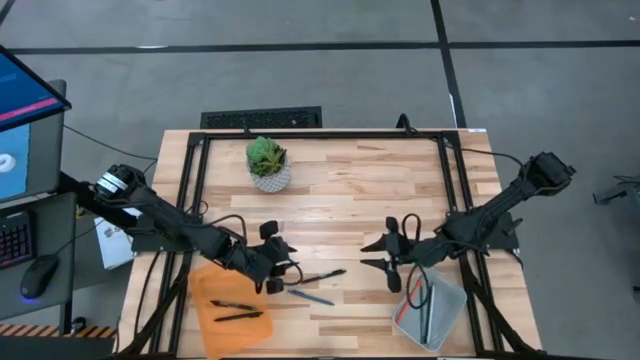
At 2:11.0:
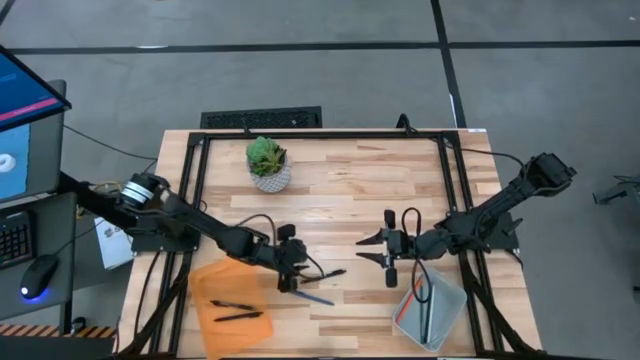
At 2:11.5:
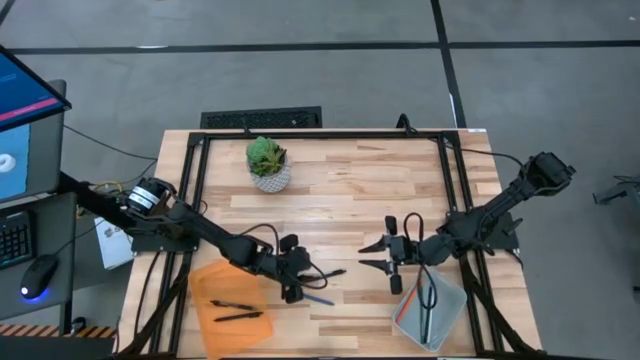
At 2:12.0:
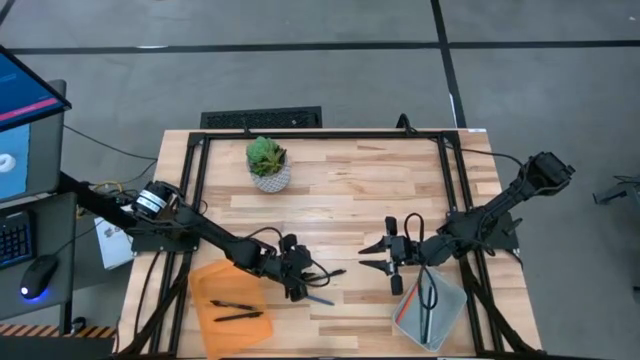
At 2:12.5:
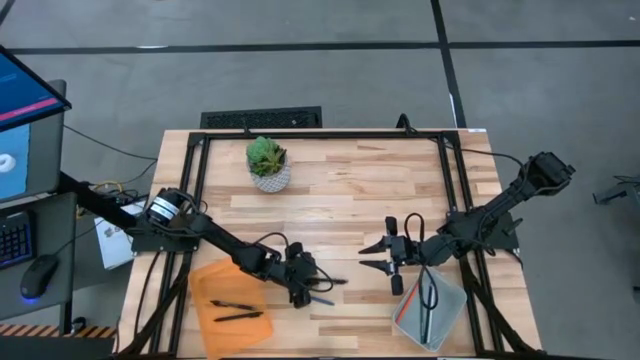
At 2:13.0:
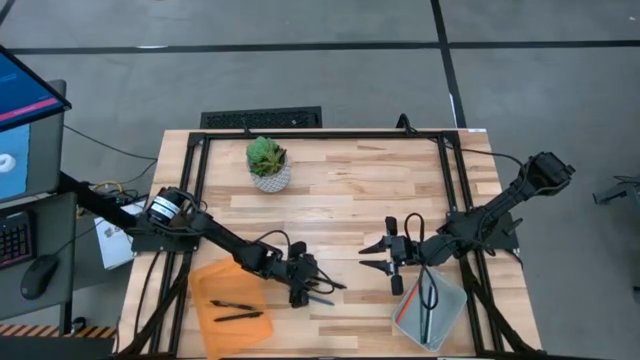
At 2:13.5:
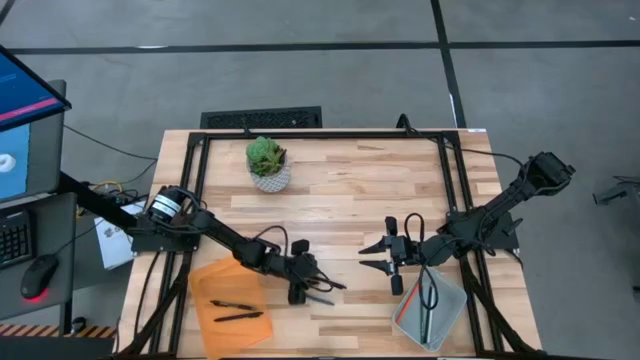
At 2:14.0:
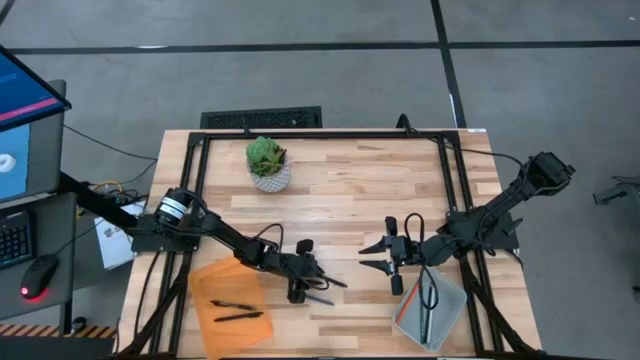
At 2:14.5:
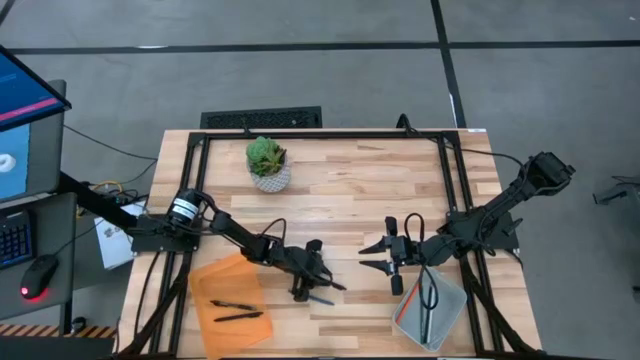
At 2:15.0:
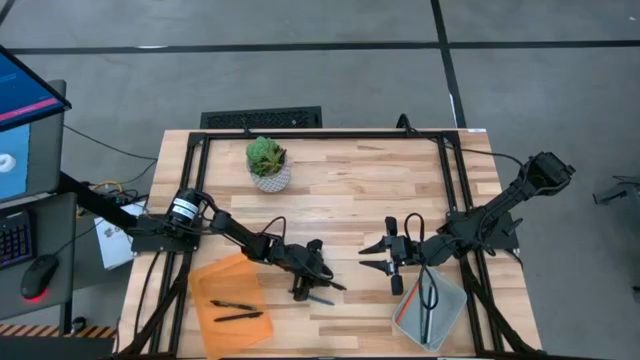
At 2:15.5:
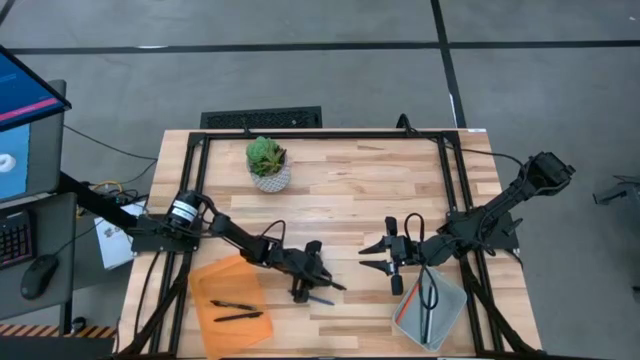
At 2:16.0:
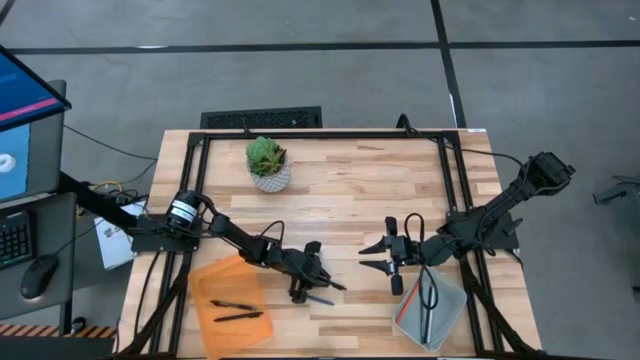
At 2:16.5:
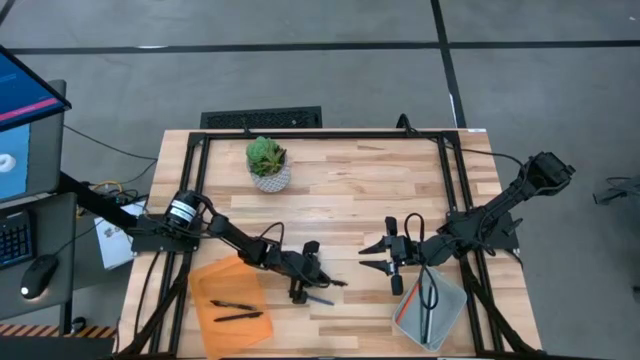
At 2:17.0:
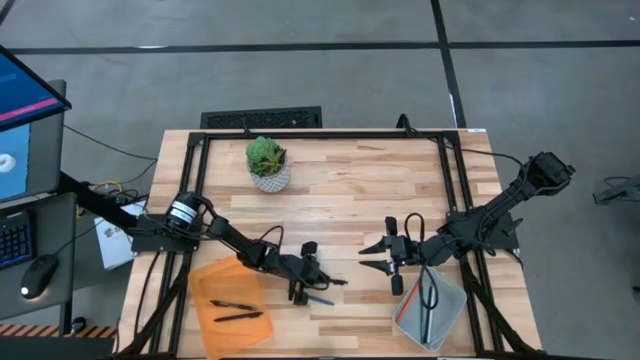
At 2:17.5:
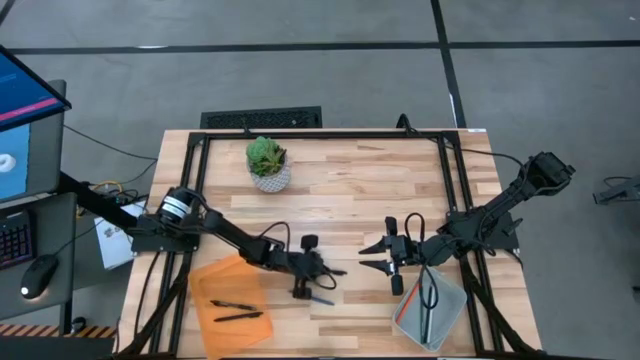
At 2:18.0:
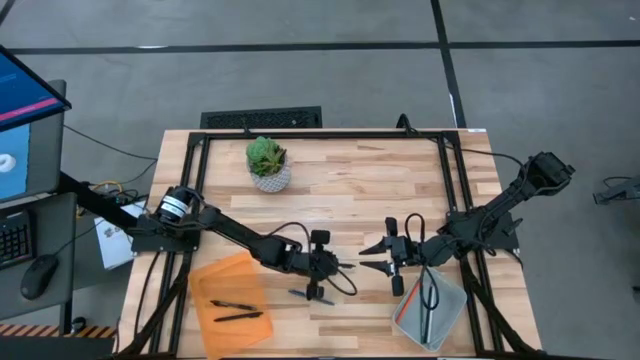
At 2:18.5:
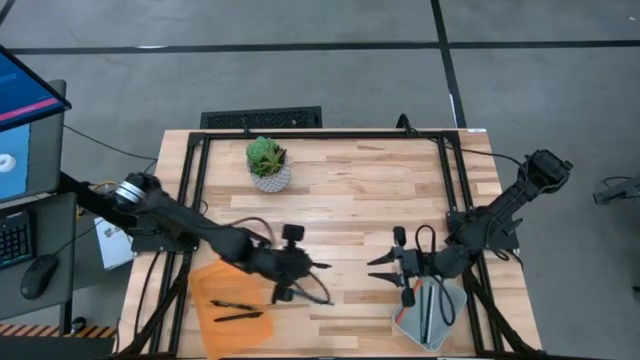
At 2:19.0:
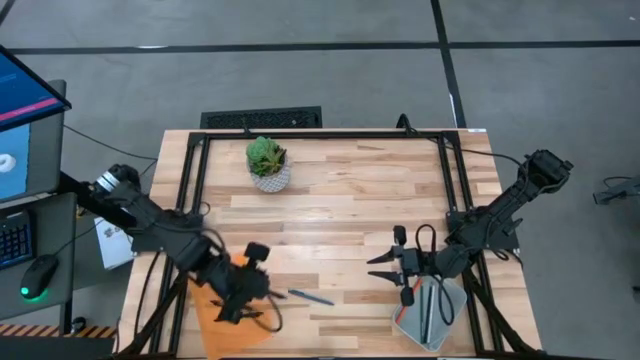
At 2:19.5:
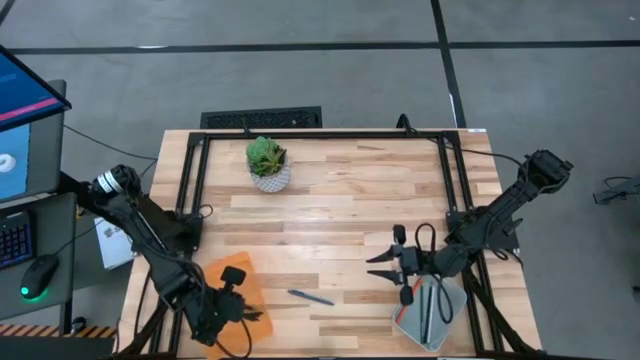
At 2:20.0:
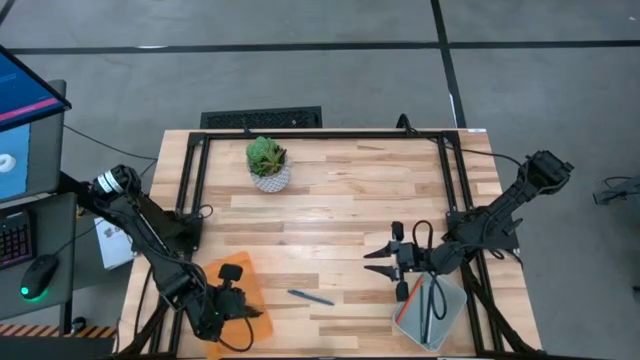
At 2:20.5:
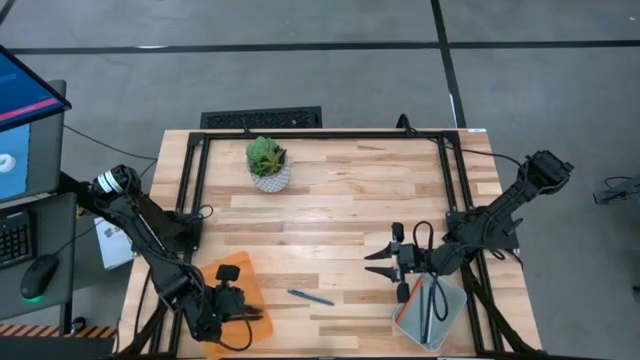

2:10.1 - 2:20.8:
Task: Sort pens & pencils
Put the black pen into the orange bin
